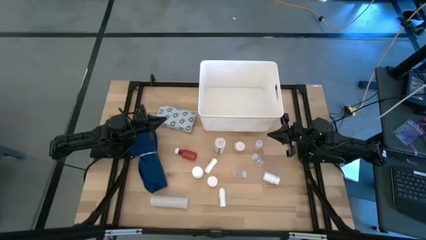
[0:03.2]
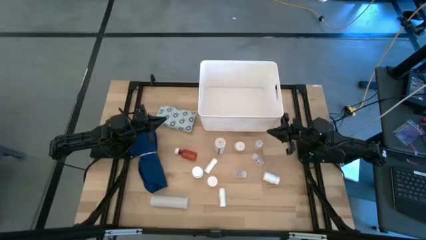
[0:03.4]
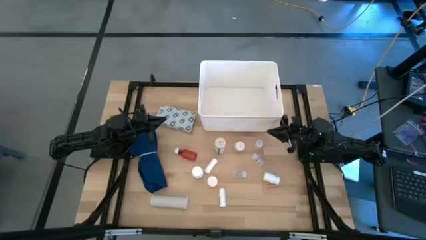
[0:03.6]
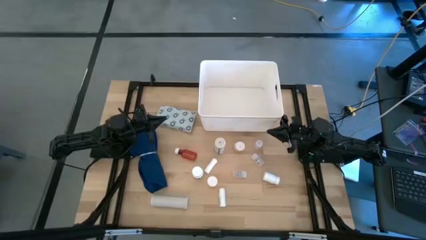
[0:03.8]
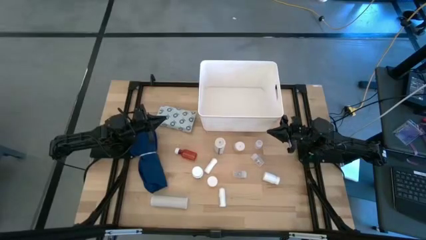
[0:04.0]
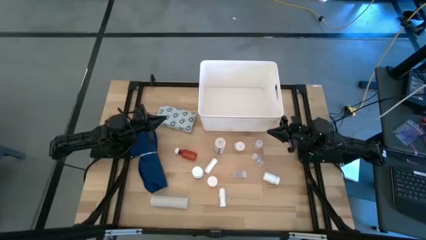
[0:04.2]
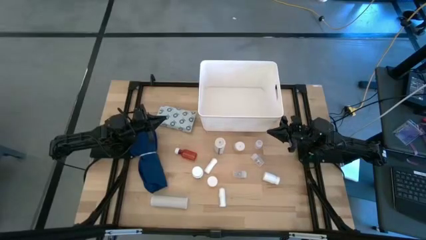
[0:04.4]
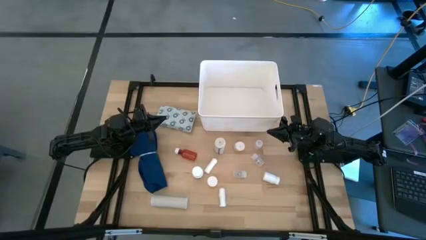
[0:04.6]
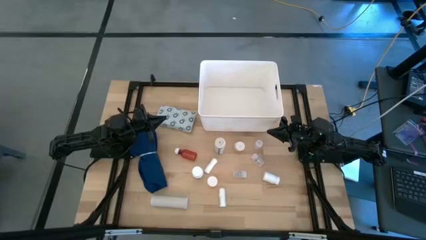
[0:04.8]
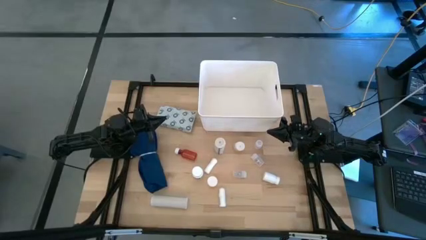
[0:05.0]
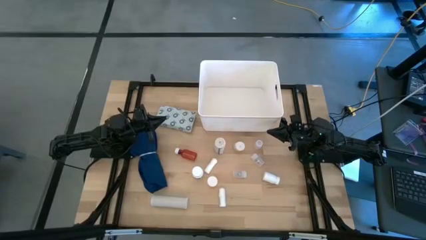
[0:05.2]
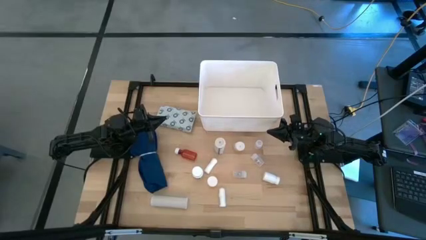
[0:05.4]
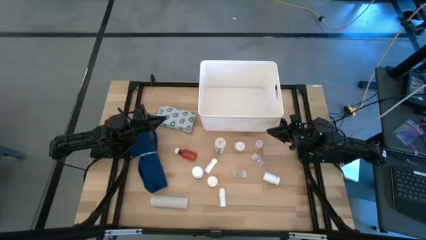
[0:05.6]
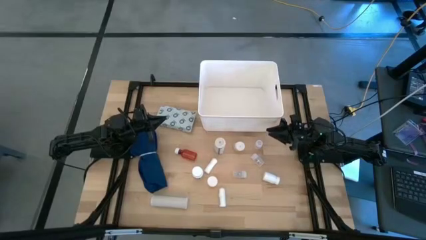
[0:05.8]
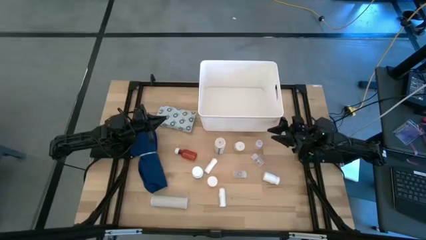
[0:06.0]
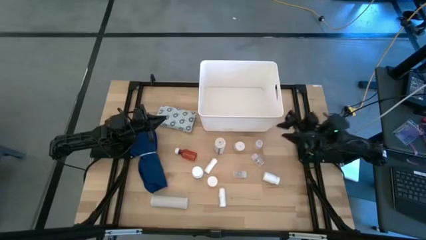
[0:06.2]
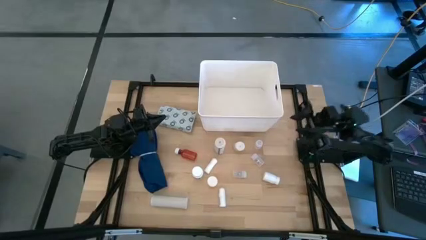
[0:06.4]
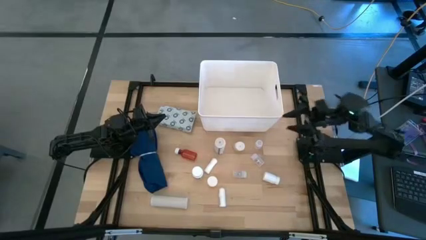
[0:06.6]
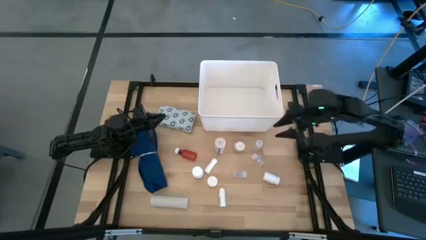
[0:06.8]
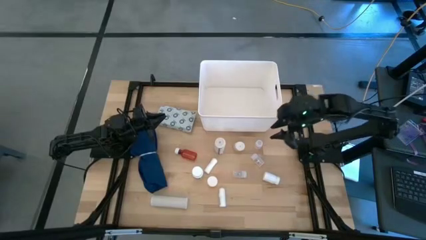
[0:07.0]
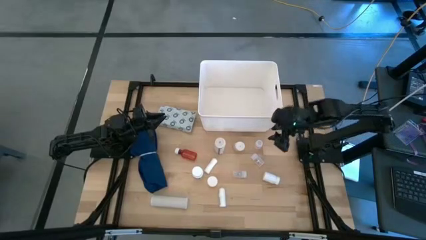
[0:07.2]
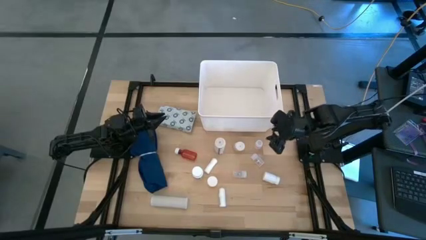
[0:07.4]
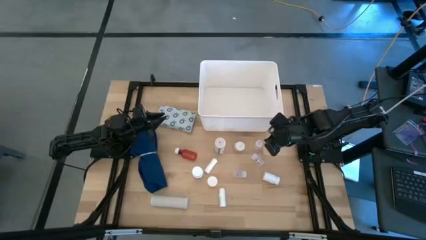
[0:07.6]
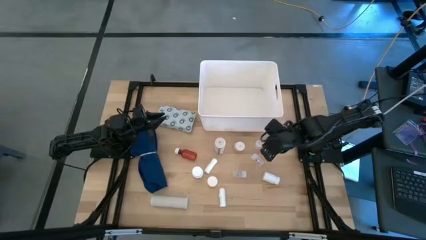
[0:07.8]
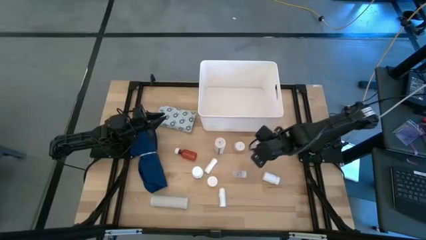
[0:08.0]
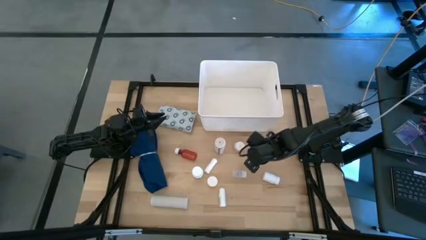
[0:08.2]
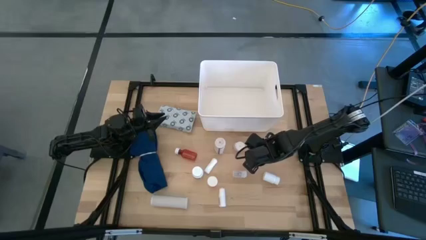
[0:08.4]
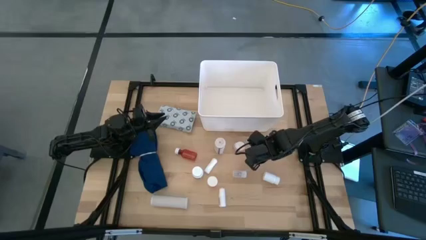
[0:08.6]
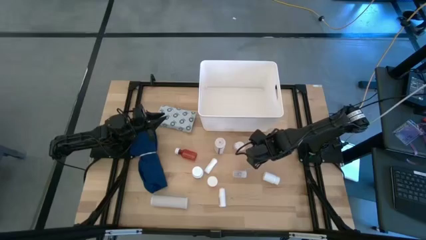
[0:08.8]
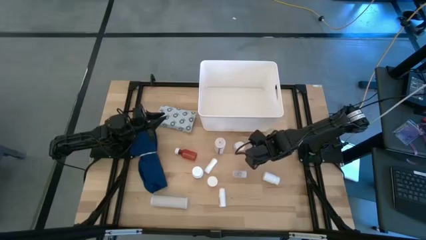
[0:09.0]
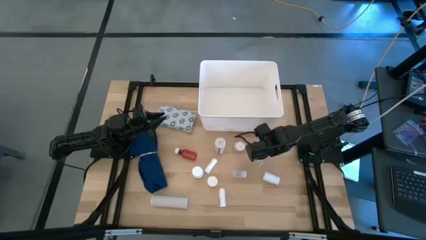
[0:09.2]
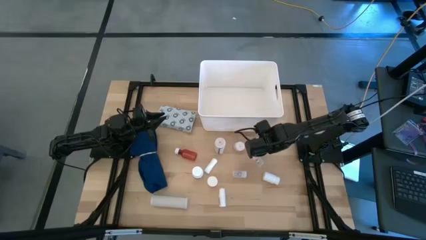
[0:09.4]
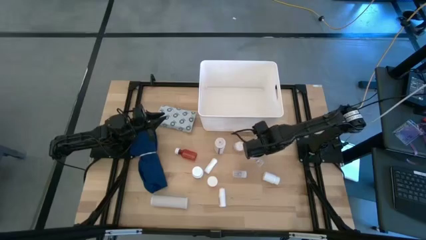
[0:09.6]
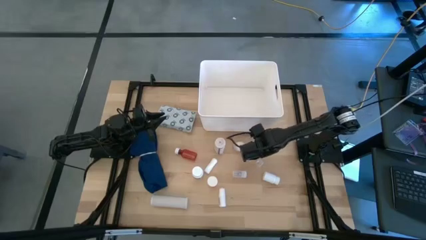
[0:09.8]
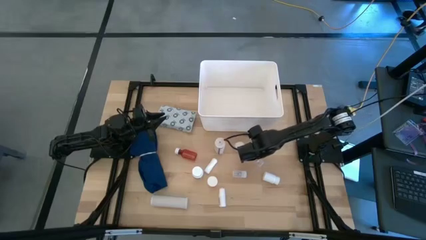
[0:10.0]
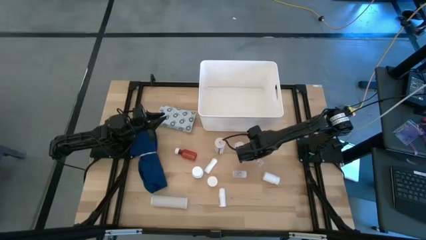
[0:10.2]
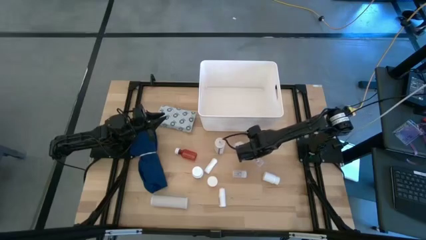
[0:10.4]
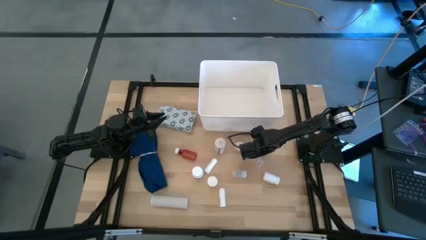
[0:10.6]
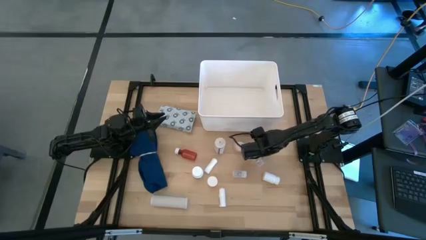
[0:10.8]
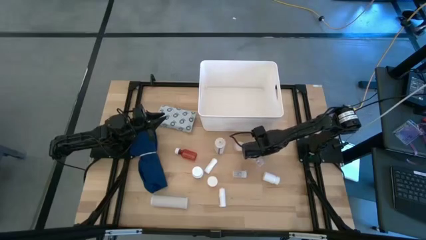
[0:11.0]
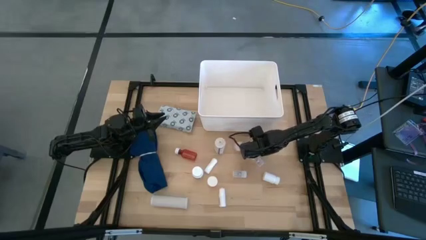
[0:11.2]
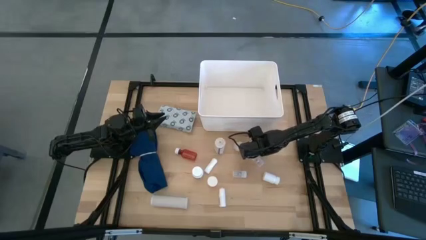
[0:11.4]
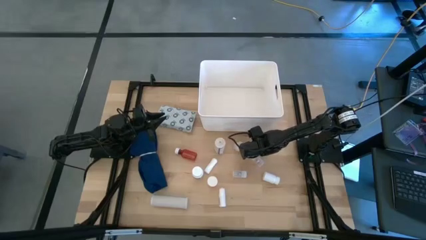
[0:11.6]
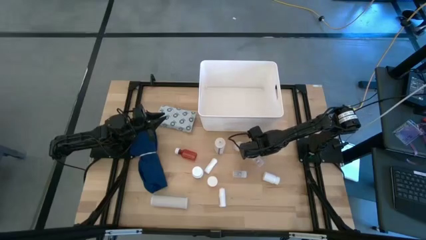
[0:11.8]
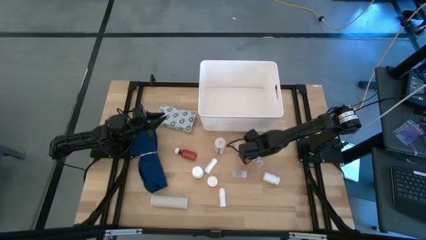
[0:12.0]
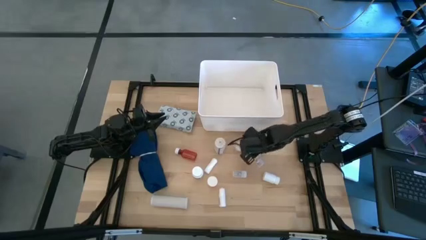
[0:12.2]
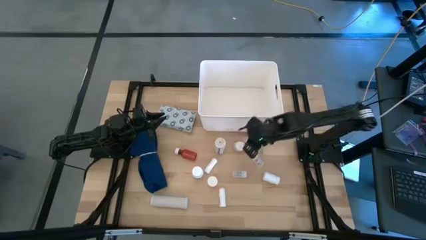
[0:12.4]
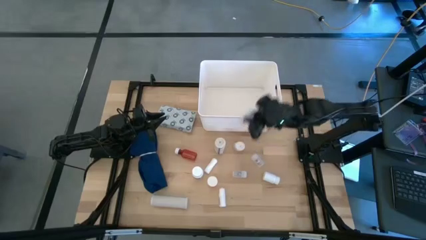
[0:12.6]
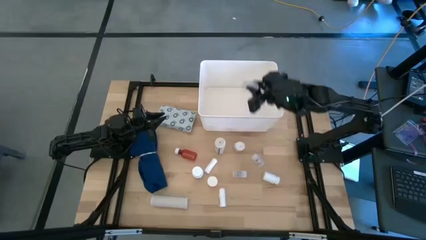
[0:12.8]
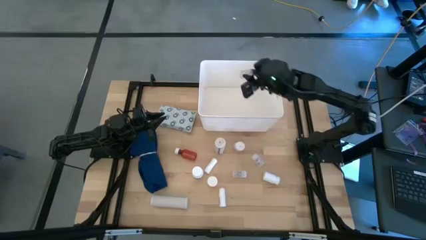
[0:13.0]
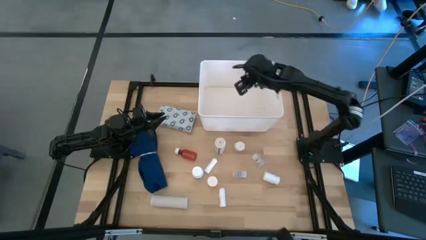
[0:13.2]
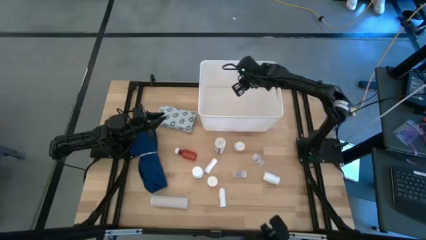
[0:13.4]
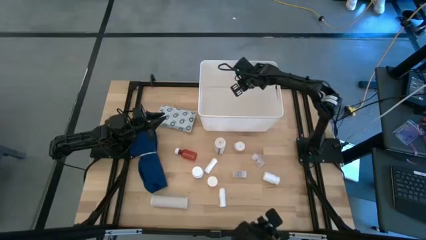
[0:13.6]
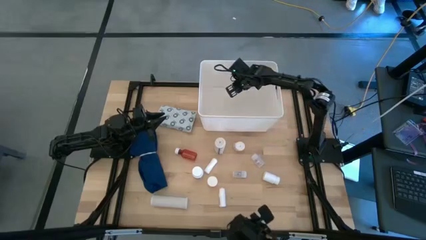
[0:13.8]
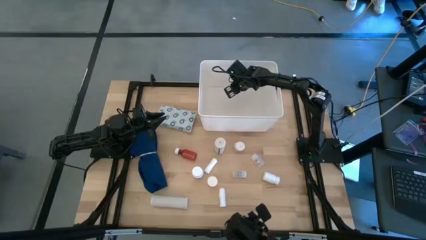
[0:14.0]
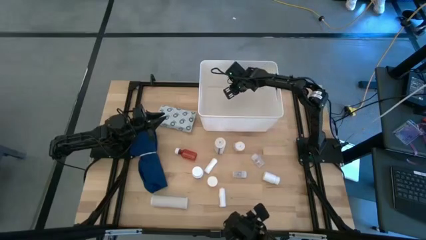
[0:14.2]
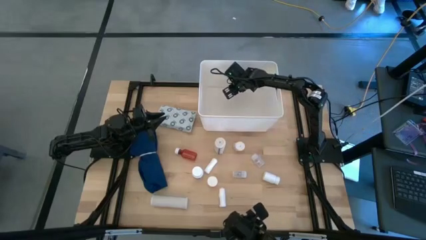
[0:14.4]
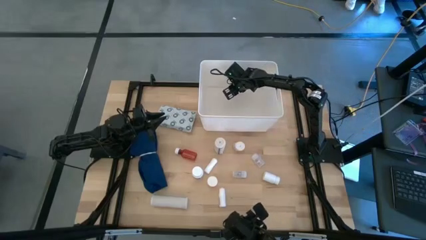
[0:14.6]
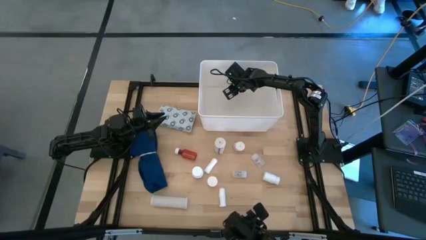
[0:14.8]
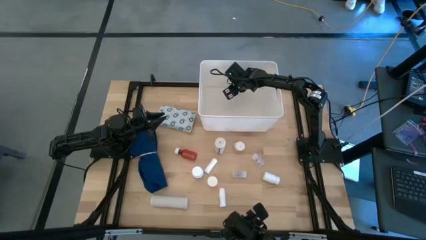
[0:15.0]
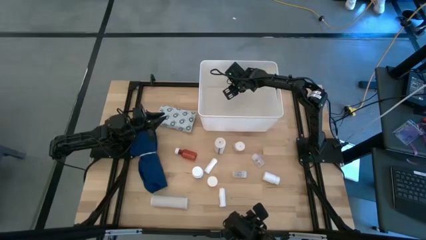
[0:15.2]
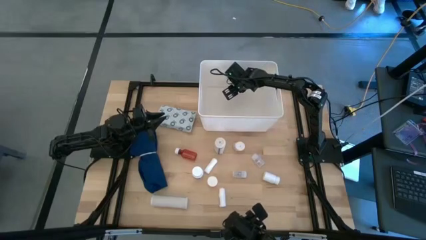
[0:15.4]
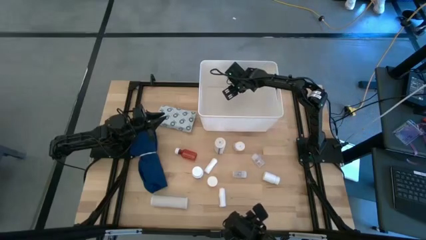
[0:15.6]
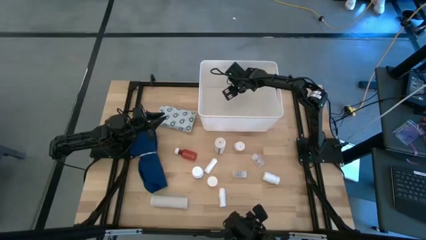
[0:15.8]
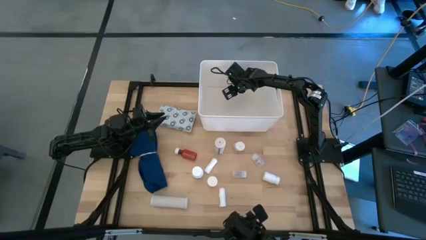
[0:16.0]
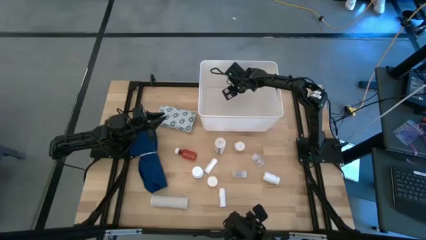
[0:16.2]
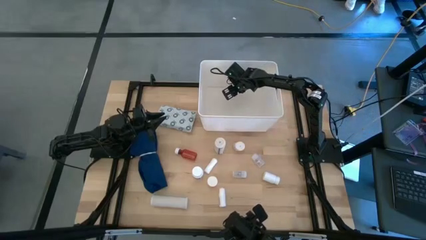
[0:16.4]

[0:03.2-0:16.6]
Task: Pick & place medical supplies in basket/bin
Put the transparent pill bottle in the white bin

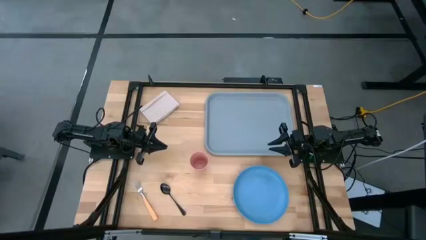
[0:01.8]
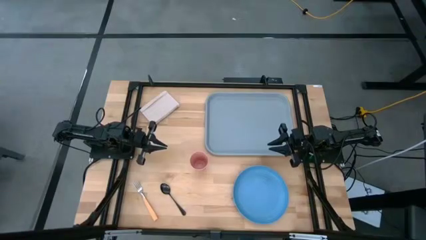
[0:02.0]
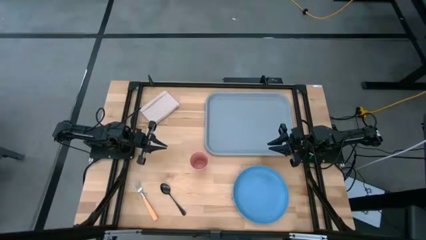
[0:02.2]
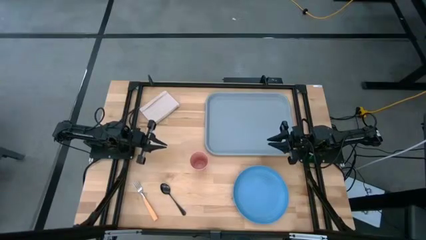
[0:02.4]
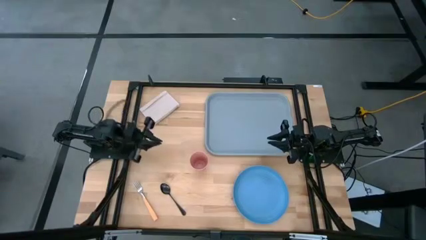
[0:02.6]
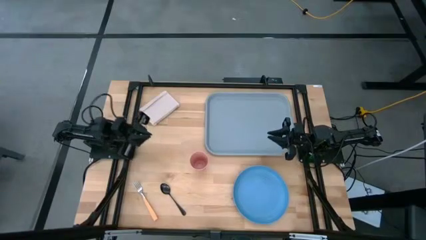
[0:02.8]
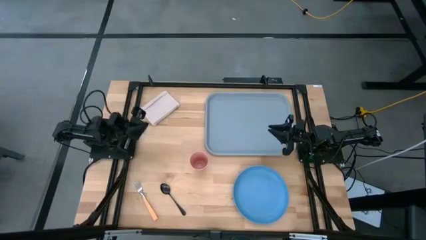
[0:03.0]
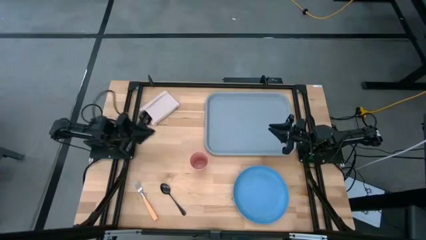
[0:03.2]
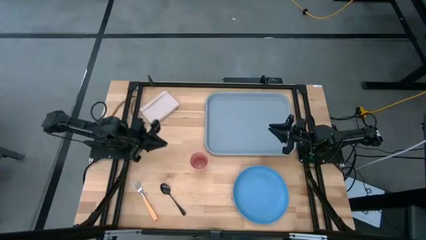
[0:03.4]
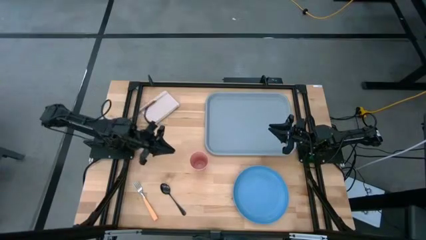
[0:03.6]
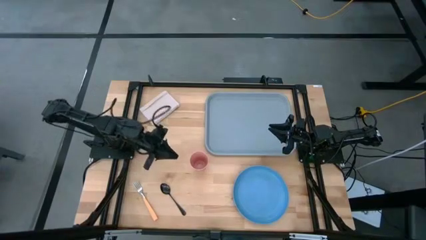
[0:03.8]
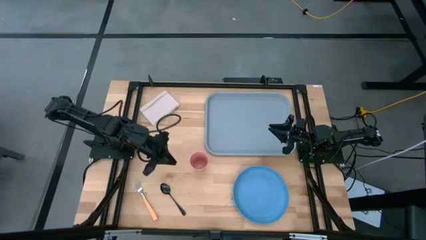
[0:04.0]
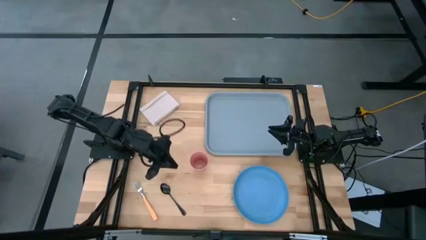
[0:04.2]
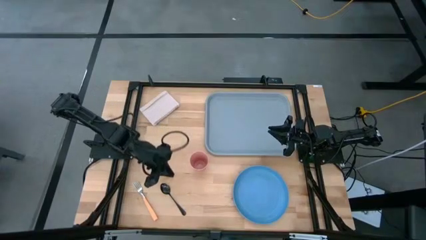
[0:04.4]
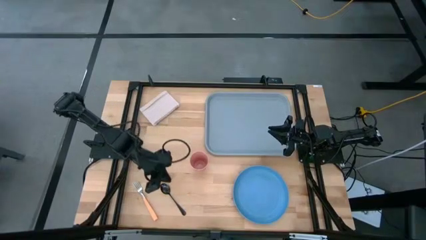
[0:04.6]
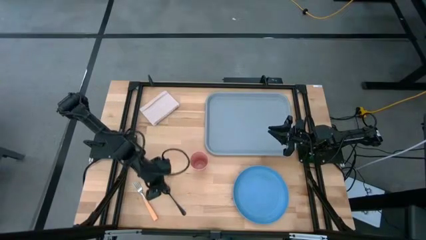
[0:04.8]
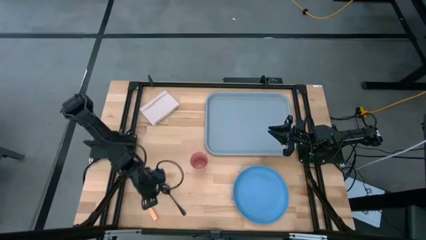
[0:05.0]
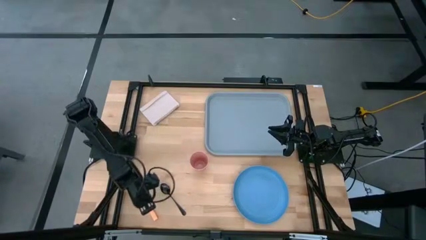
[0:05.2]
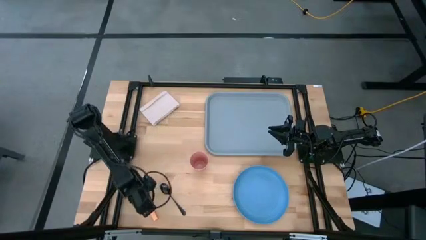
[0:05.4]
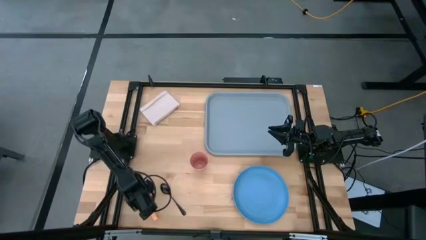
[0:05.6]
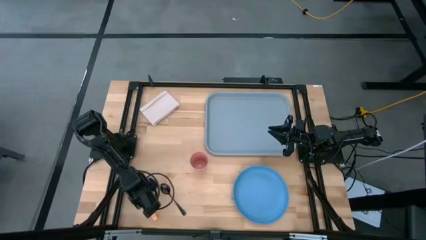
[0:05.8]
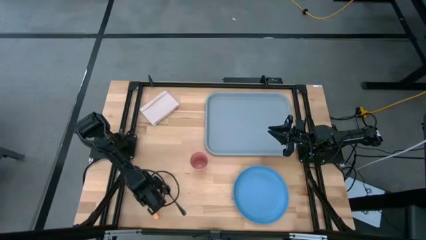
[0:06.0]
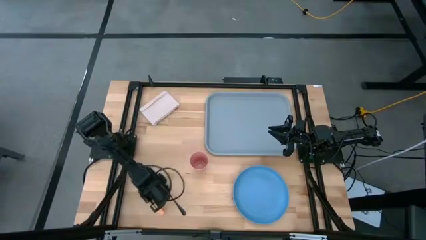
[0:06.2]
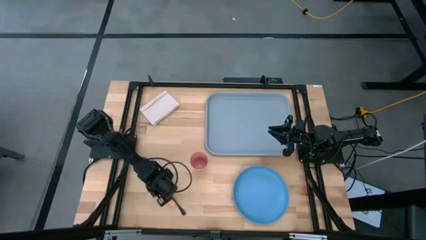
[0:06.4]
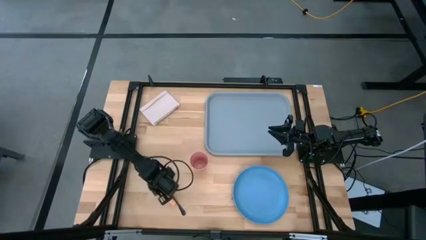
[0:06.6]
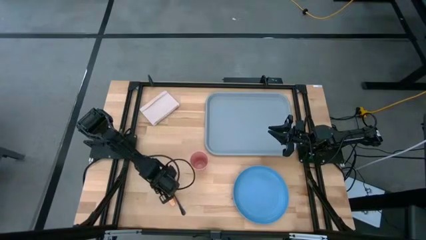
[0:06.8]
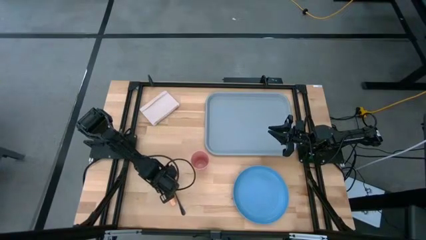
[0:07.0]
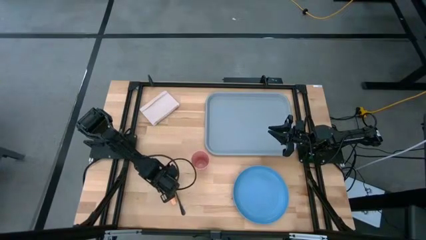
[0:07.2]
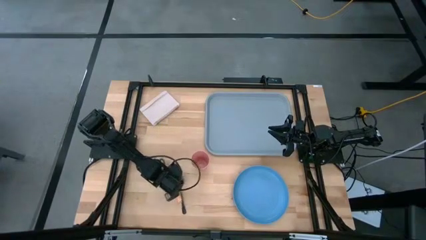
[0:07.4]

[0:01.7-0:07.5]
Task: Pick and place plate/cup/fork/spoon on tray
Move the fork to the center of the table
